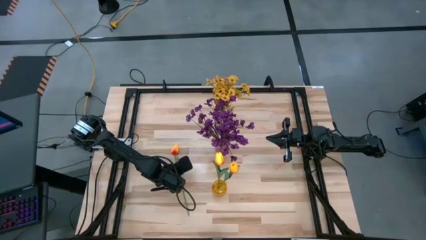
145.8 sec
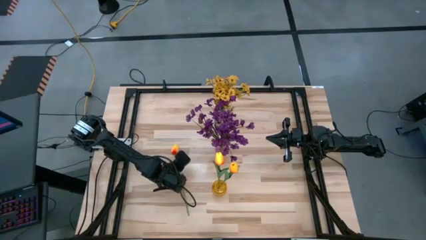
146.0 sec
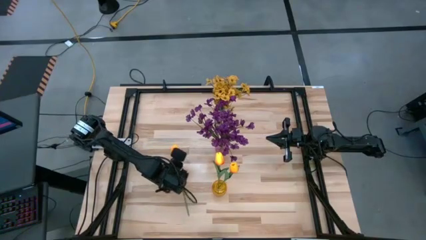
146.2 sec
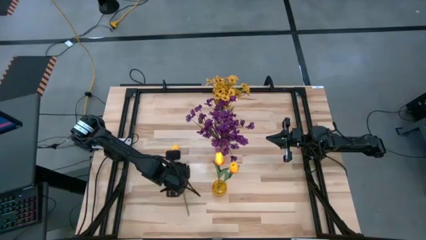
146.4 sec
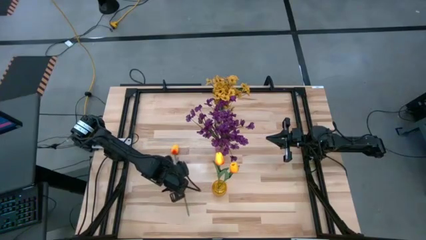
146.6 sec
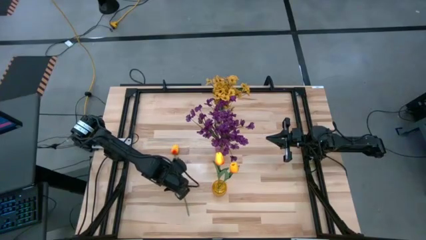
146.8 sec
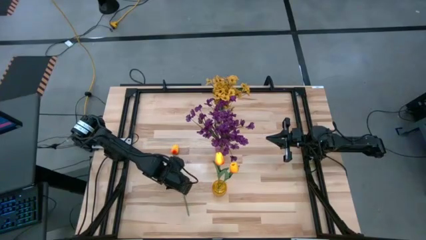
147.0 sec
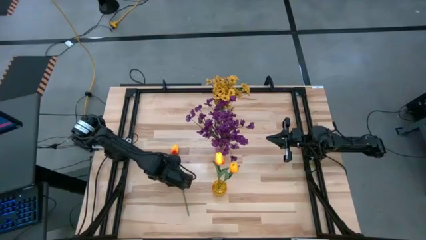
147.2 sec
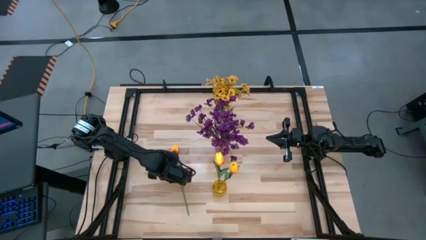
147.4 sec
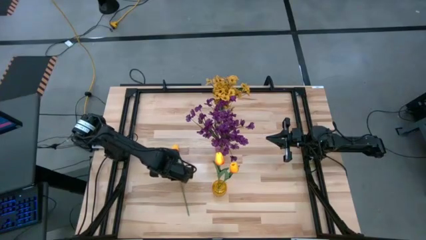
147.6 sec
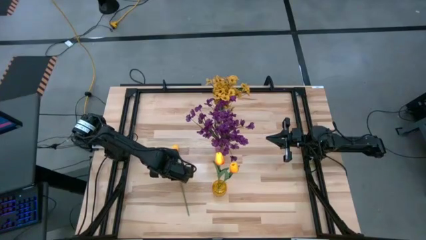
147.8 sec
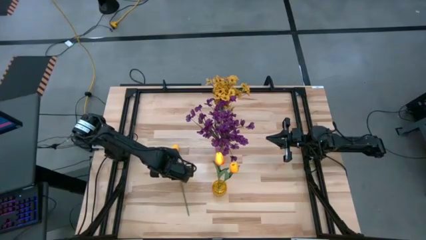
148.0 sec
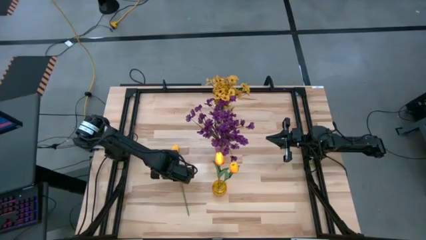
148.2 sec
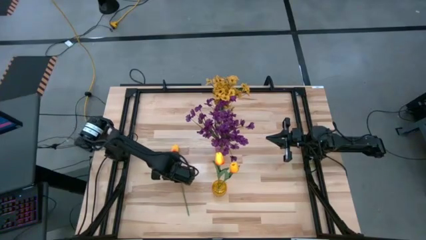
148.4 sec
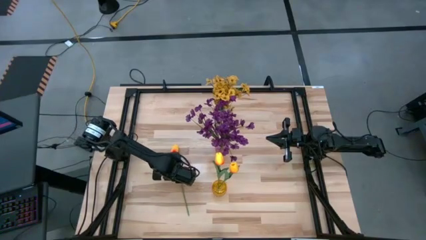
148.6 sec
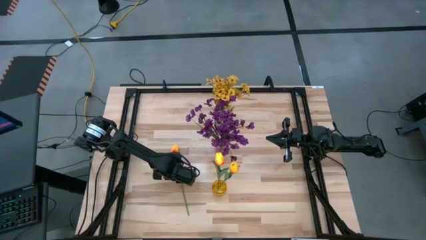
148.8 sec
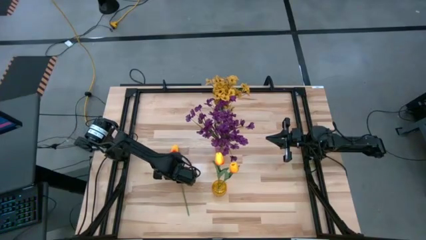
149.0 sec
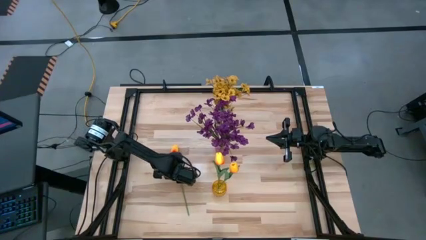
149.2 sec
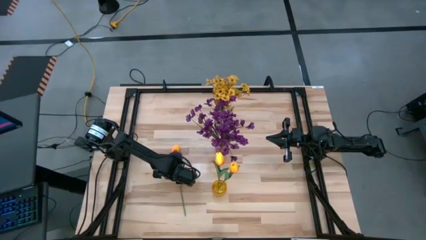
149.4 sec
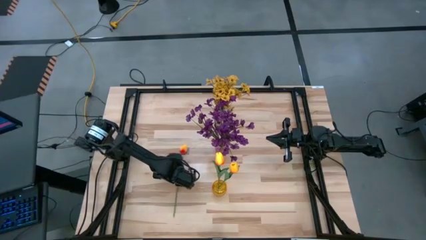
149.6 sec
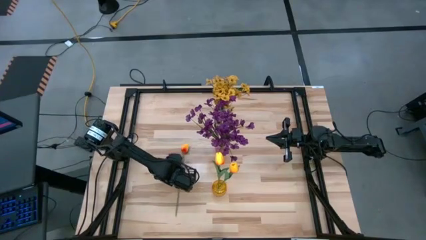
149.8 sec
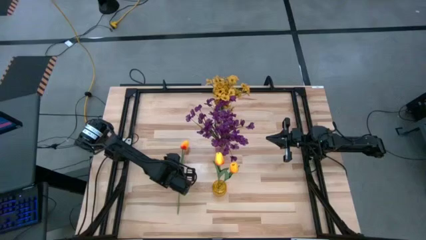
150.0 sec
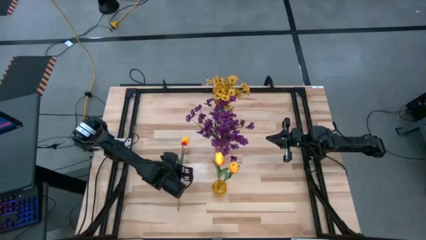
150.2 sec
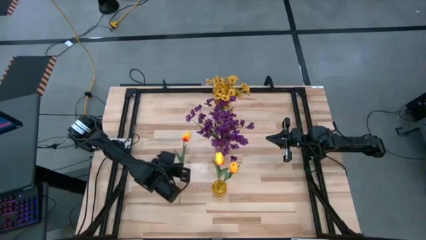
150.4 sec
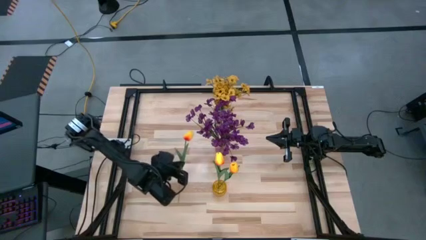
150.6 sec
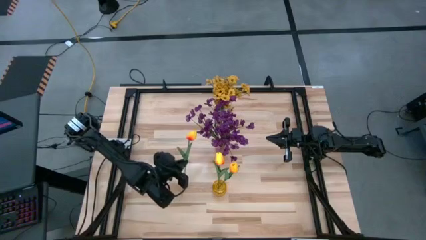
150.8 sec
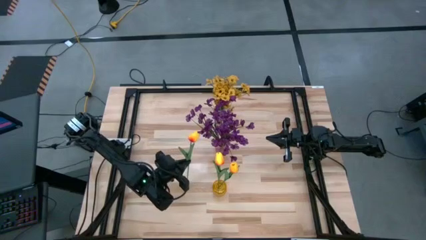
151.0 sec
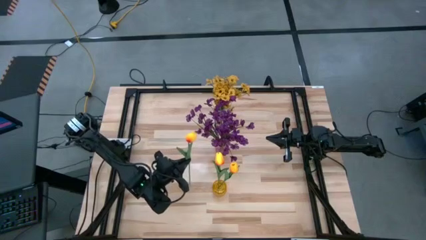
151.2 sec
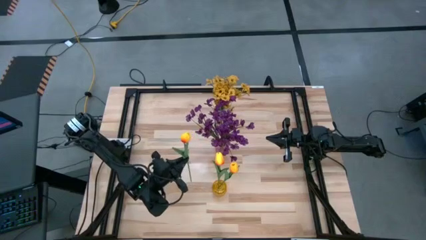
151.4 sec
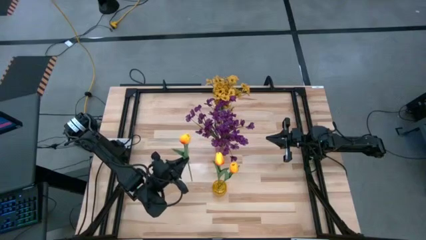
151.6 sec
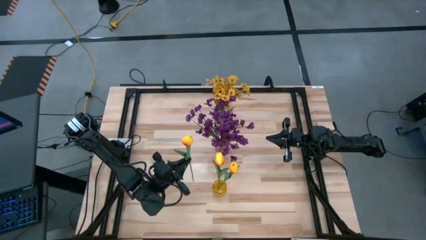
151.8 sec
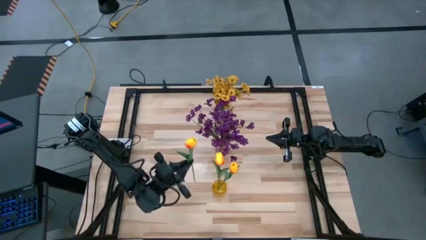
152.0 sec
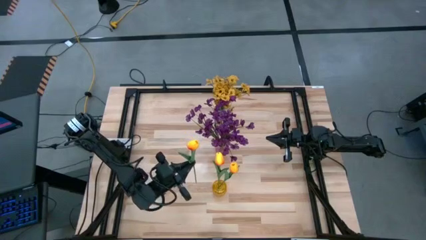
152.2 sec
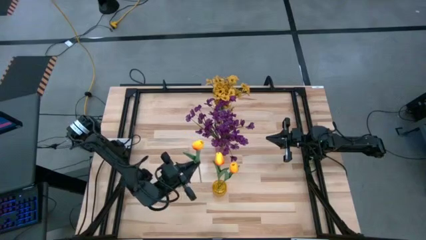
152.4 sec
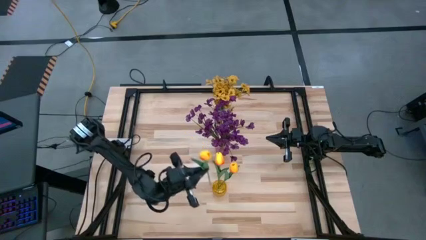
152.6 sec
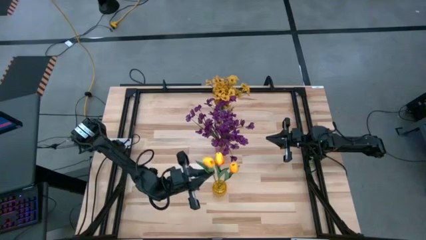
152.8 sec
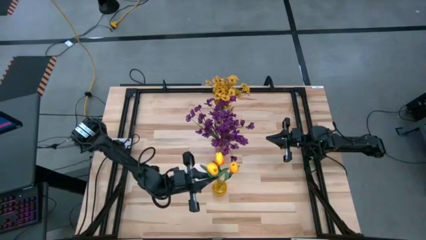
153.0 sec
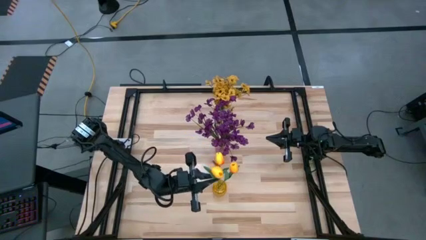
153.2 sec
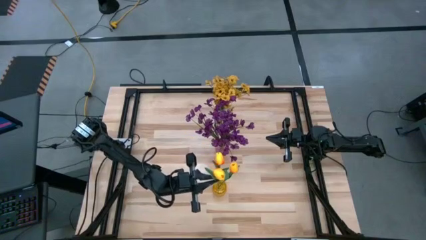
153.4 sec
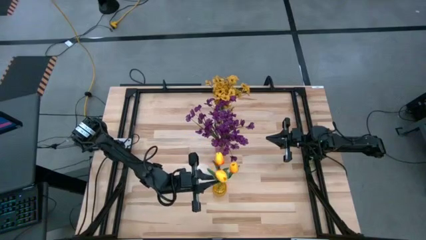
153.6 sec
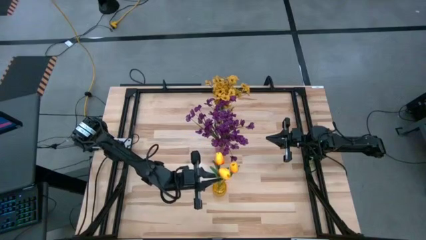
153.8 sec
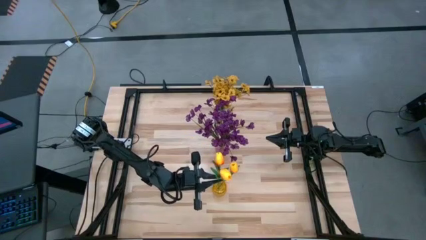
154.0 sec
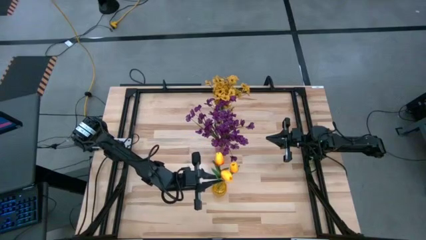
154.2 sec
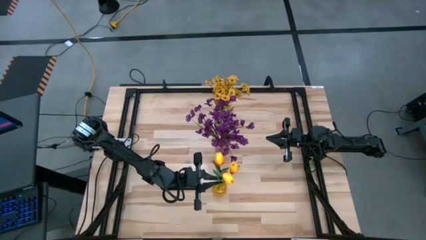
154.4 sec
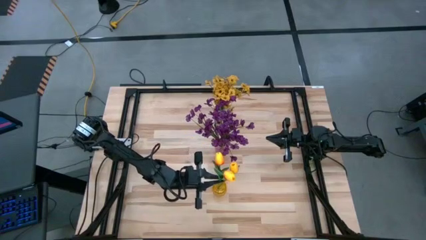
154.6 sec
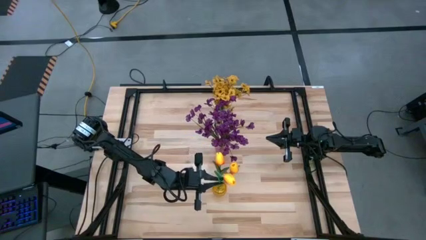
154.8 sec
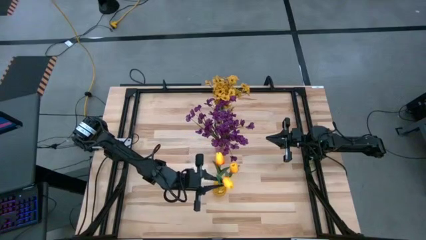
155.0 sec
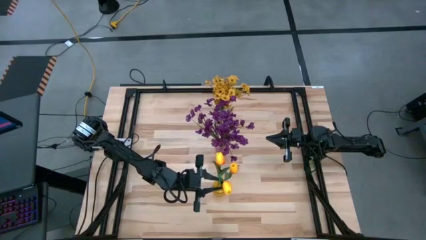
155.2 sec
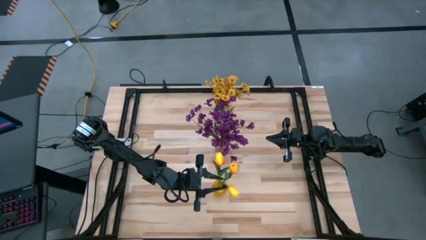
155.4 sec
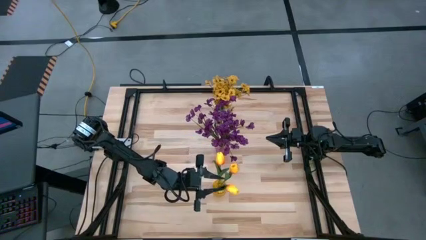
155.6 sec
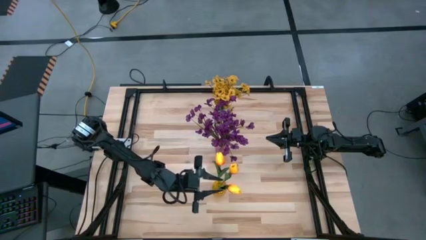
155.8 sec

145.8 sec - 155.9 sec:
Task: Sort flowers into vase by color
Put the yellow tulip into the yellow vase

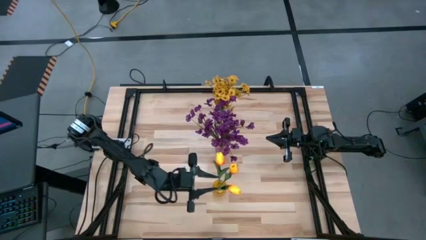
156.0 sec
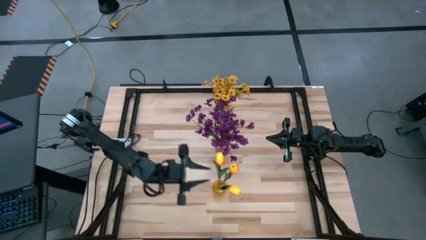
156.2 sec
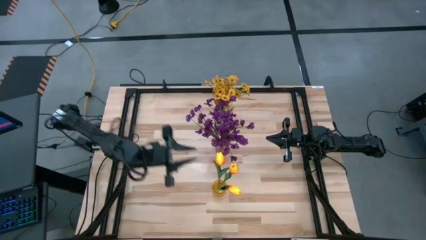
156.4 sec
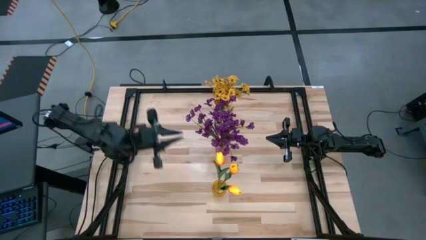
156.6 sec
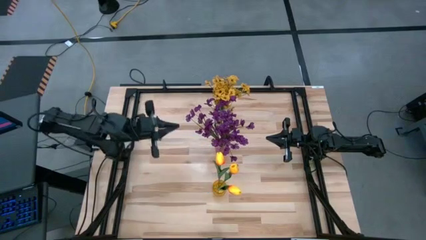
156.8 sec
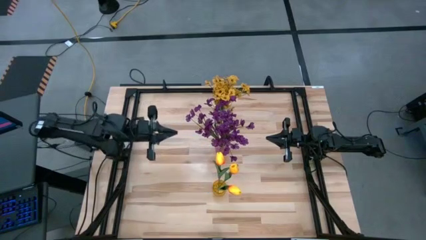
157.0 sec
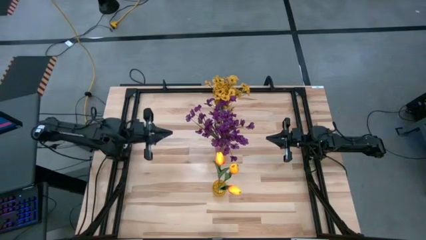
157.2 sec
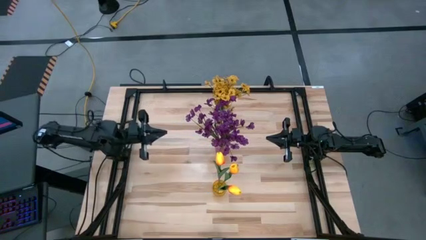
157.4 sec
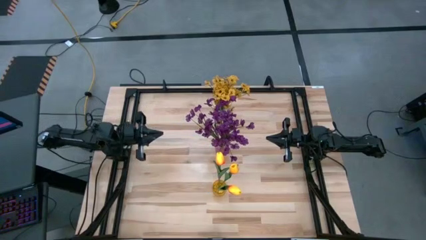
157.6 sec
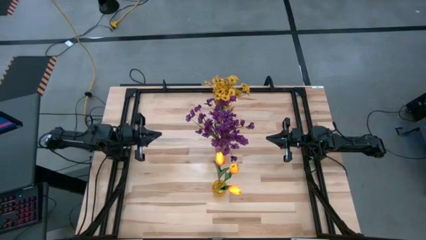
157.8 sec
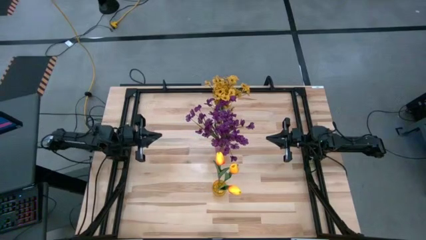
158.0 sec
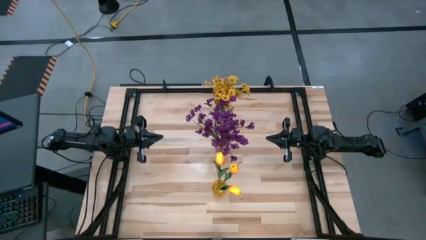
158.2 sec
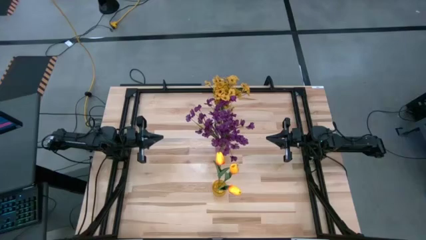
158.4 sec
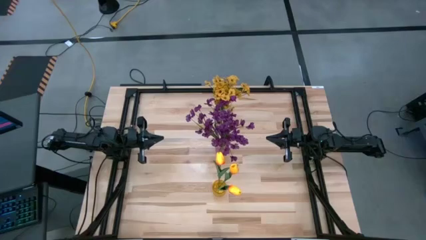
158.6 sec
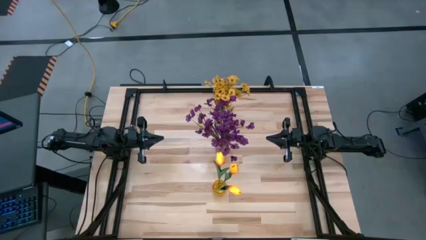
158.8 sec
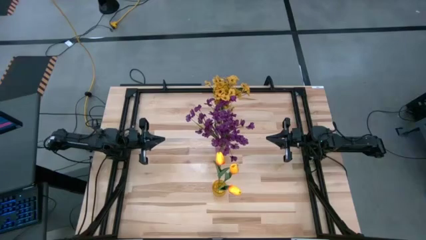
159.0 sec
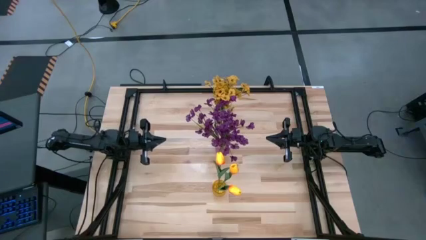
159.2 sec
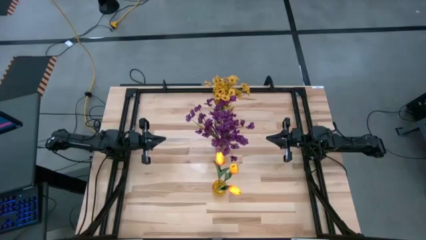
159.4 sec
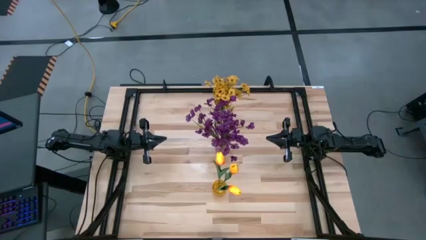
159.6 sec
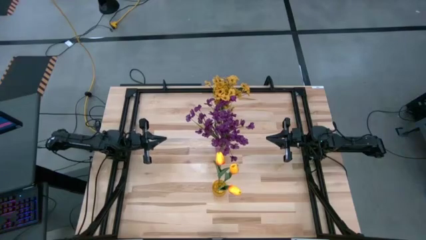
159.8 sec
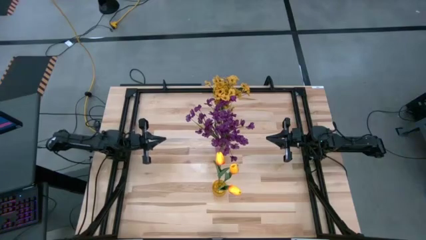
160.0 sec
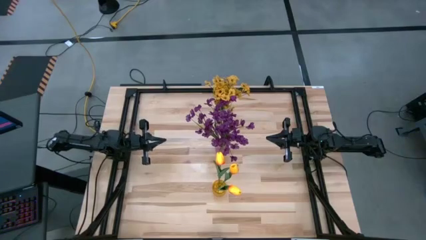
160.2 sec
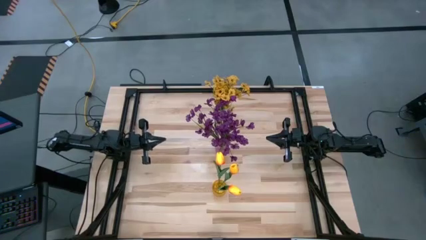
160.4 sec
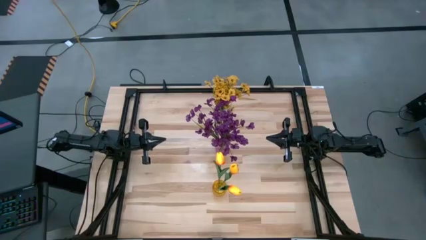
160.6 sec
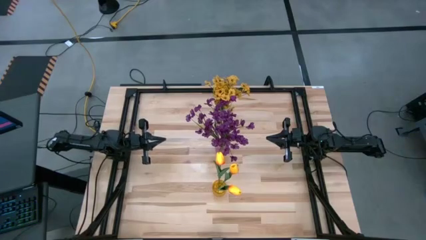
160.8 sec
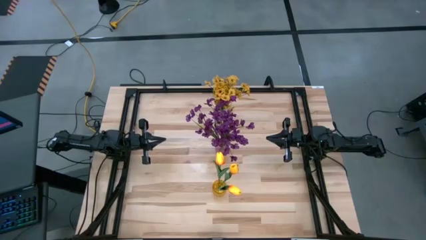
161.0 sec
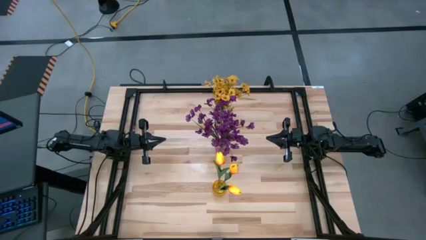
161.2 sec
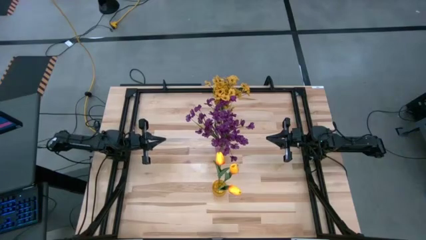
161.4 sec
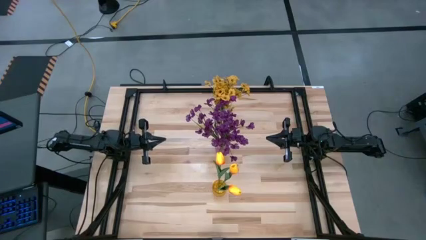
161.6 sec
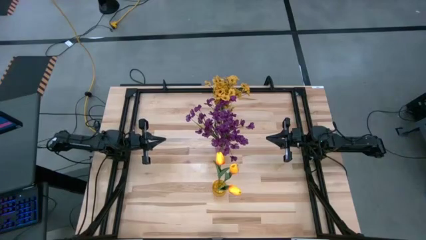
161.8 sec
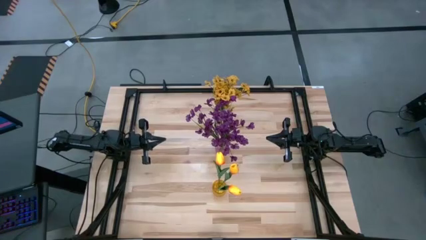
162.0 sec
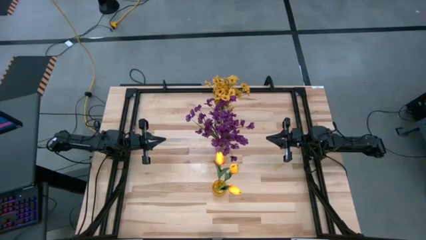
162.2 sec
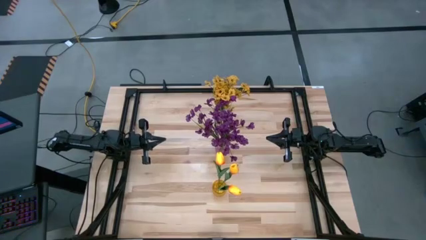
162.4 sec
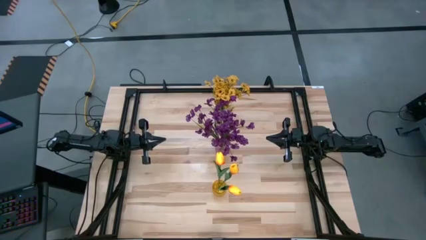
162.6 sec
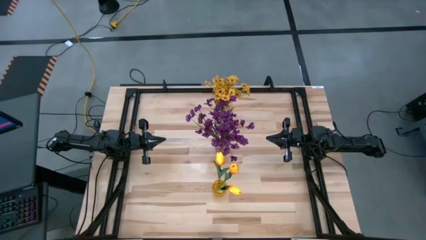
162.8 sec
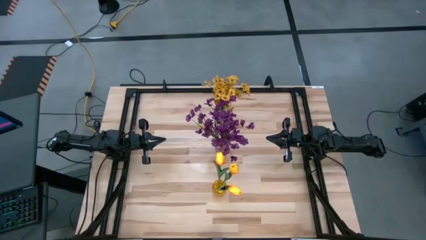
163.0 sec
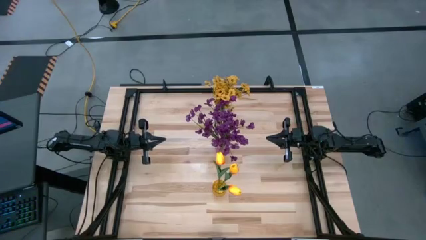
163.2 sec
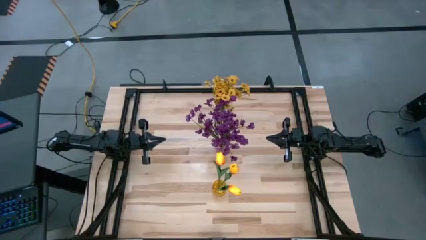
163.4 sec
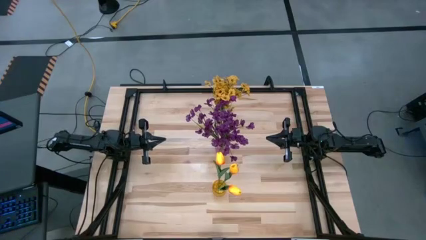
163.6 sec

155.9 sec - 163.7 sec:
Return to Home Position
